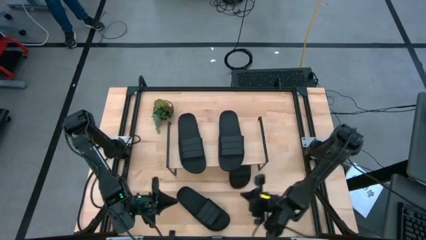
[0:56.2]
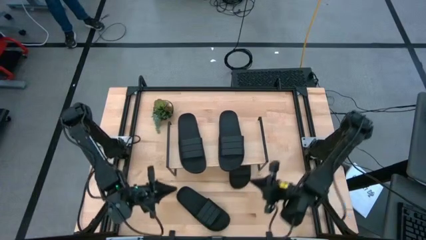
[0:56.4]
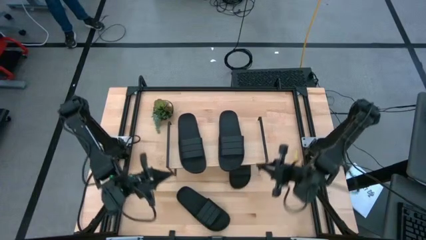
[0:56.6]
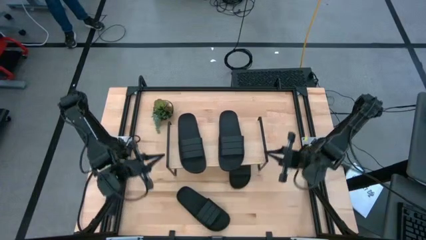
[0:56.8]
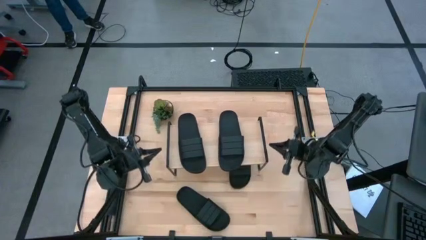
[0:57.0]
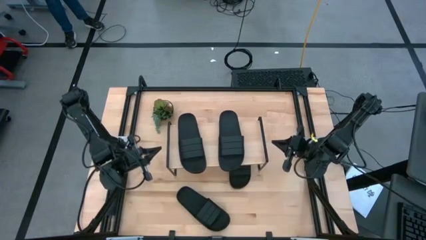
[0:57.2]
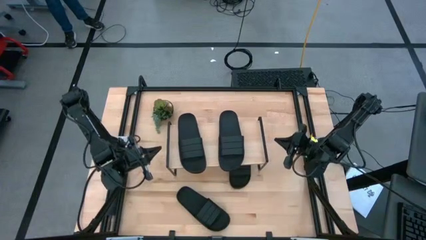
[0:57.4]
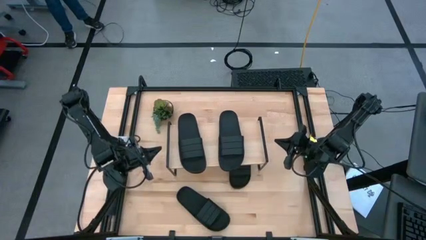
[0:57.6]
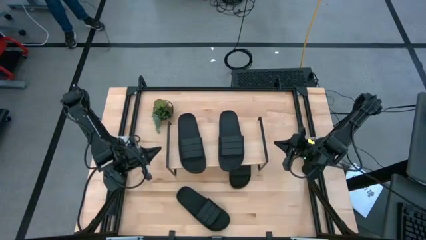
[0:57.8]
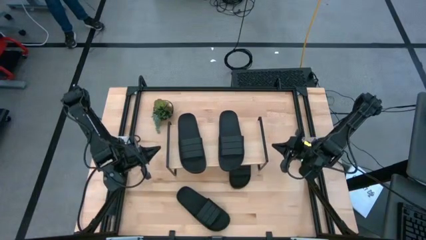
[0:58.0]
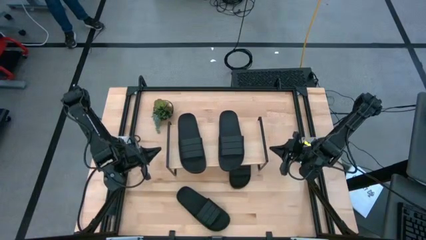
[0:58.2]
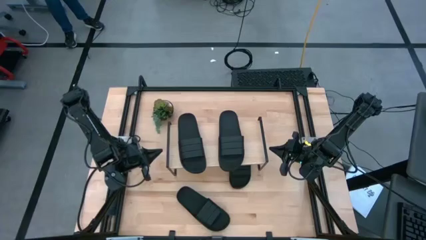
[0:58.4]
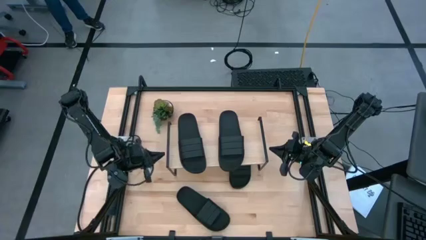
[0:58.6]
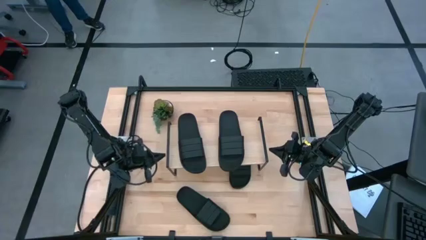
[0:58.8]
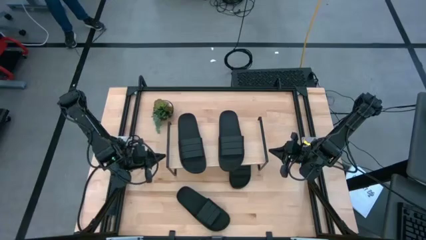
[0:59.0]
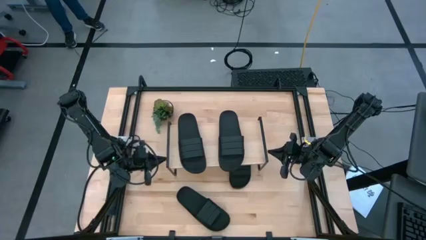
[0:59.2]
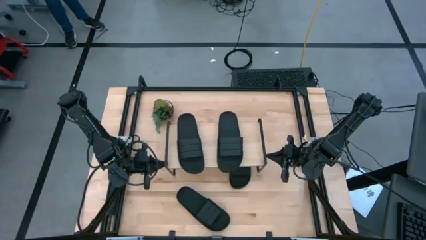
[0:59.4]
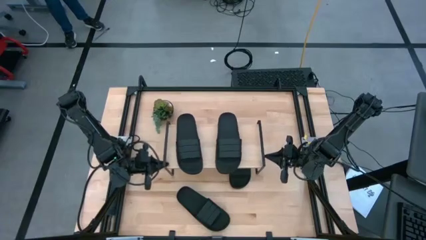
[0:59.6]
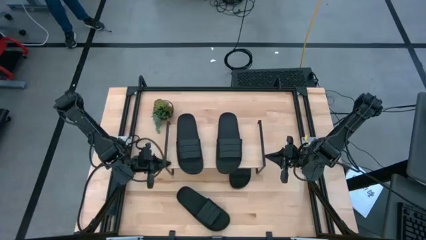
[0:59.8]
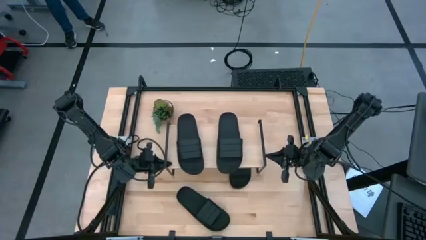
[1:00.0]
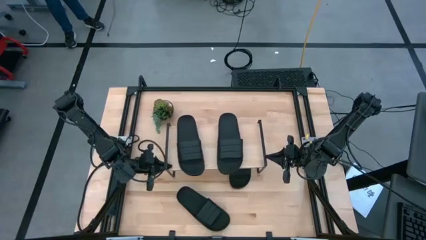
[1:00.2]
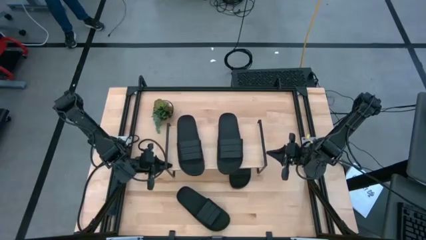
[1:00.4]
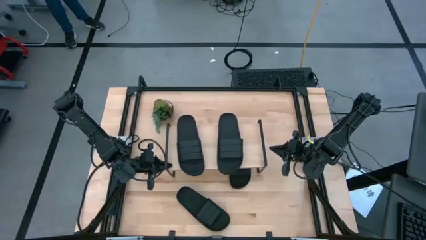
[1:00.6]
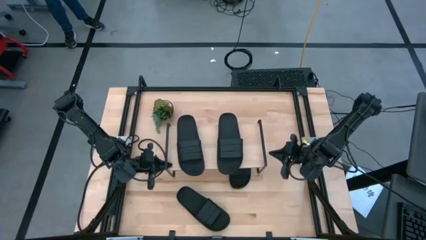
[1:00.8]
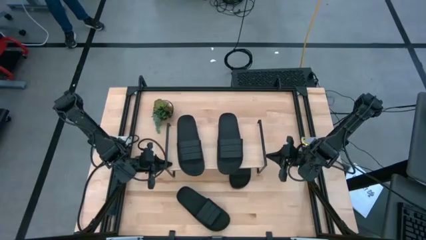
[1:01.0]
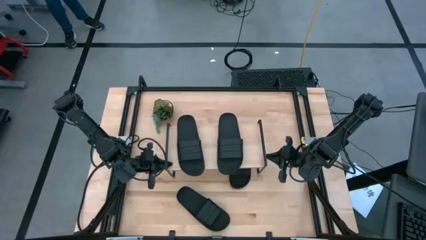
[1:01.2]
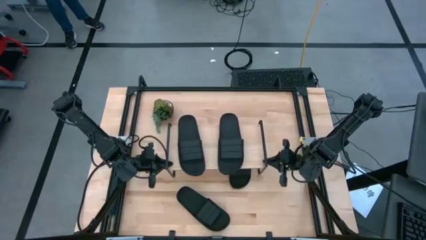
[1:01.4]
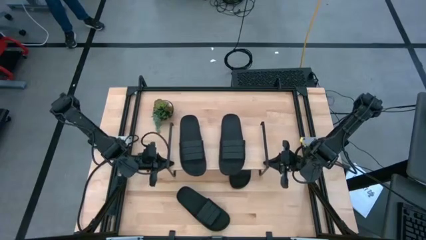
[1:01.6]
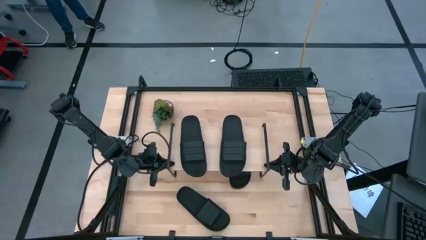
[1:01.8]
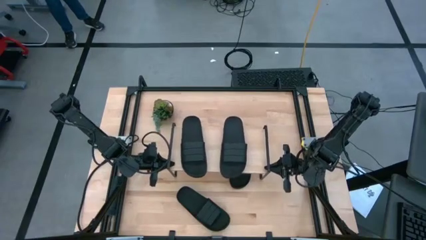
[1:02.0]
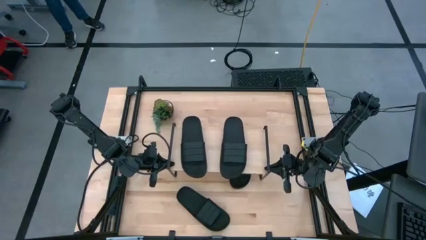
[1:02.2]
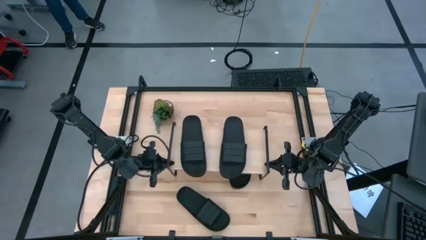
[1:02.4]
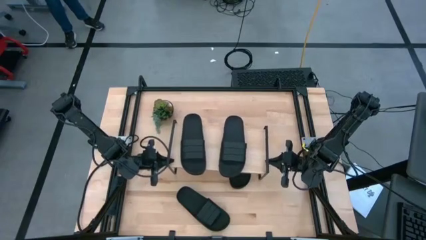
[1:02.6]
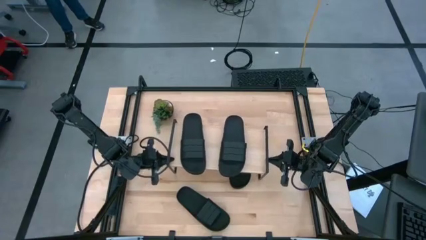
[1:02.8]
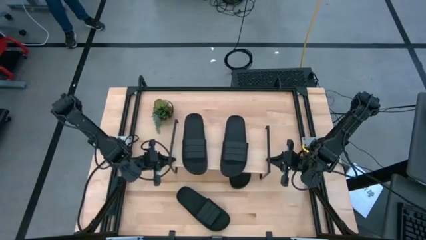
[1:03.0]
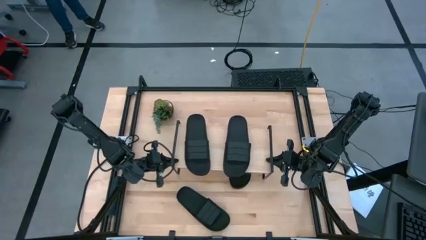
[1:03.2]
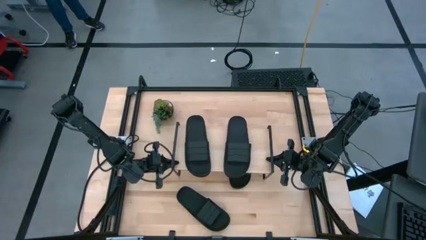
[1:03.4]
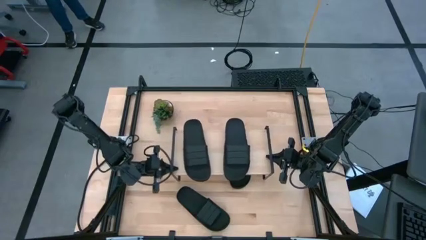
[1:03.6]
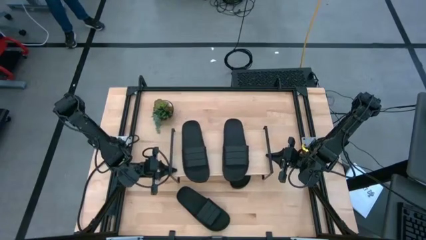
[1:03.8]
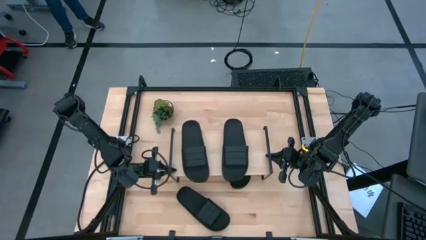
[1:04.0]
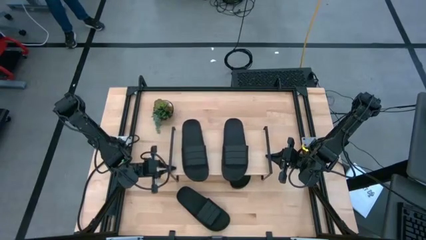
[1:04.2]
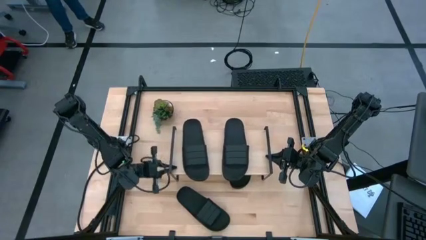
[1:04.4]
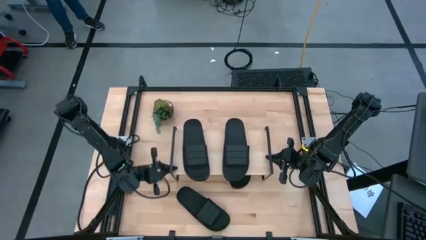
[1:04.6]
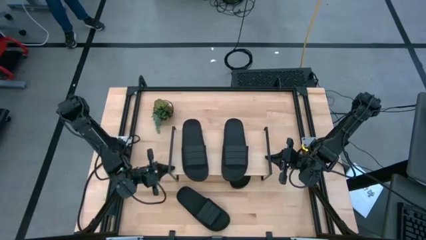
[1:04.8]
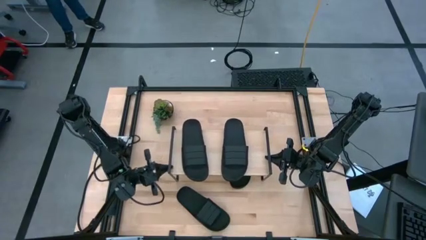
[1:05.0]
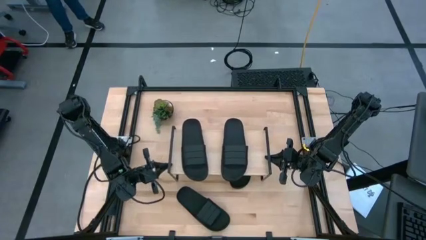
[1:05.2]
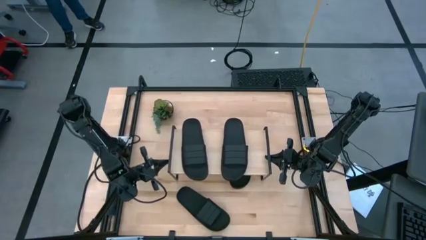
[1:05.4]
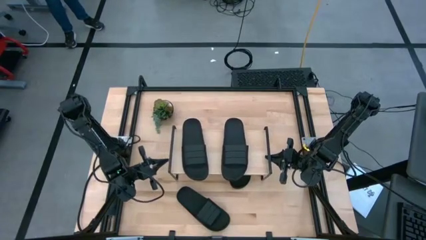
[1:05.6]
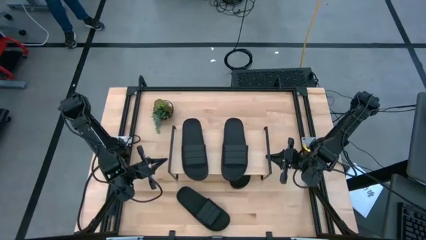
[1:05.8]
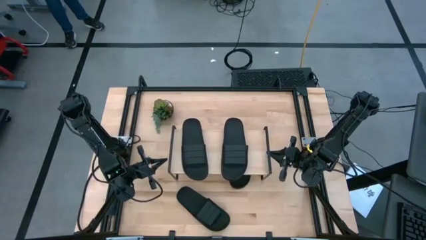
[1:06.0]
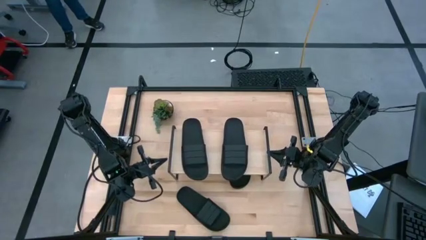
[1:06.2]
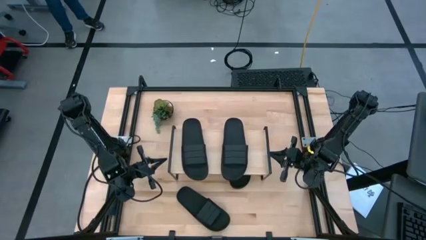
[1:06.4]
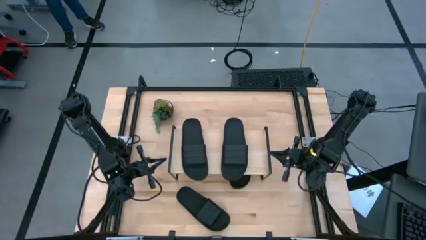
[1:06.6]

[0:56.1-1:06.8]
Task: Pick and place slides into the shelf
Adjust the shelf

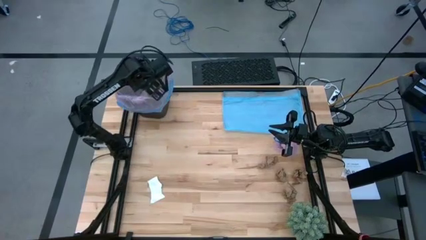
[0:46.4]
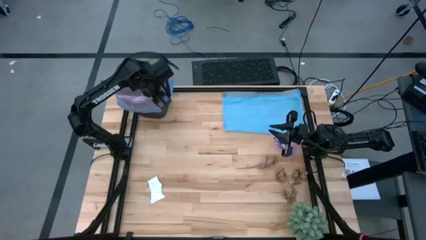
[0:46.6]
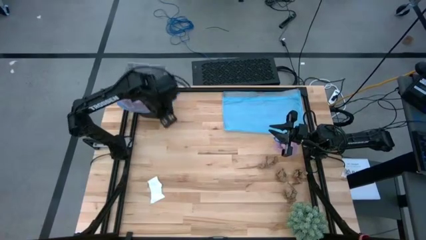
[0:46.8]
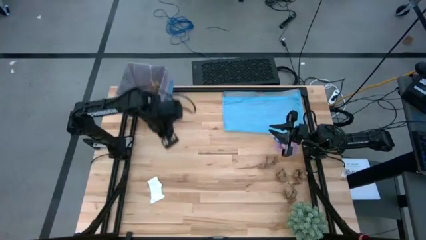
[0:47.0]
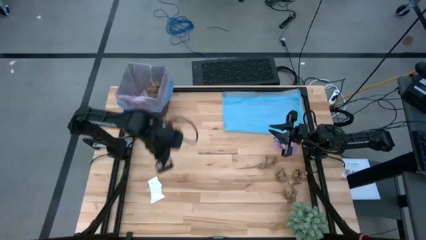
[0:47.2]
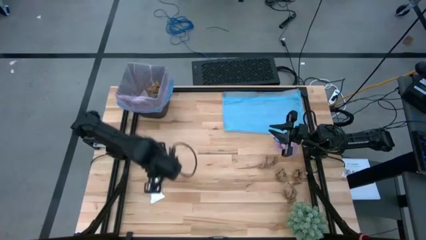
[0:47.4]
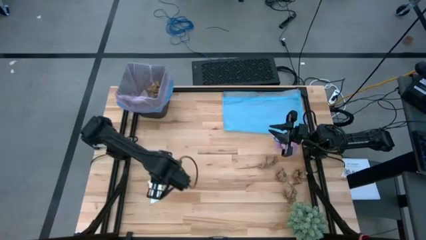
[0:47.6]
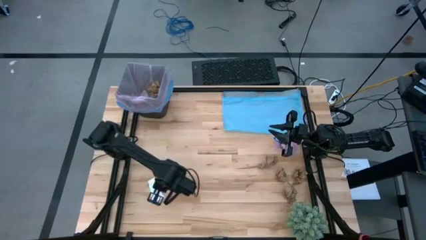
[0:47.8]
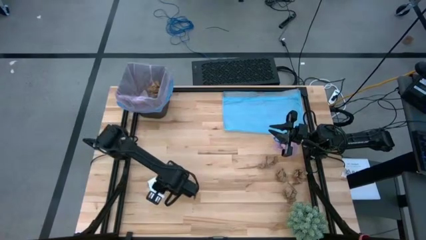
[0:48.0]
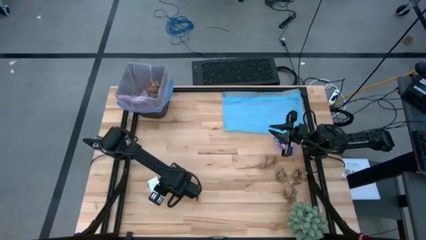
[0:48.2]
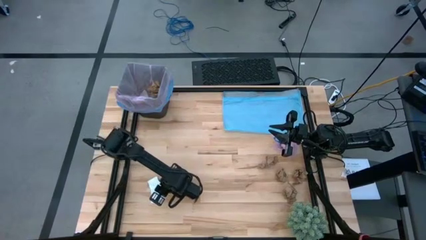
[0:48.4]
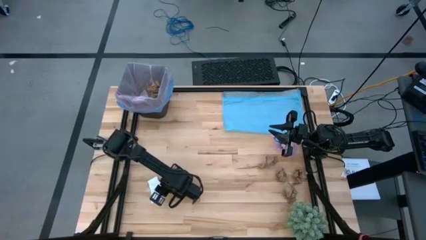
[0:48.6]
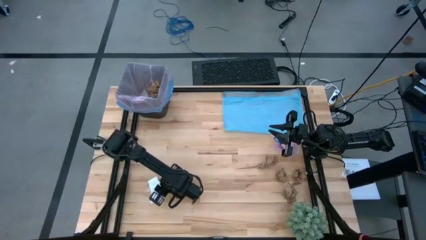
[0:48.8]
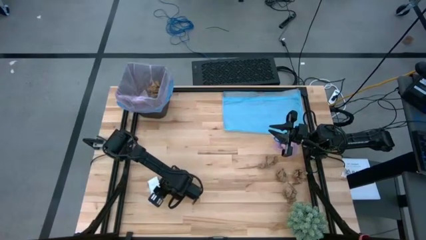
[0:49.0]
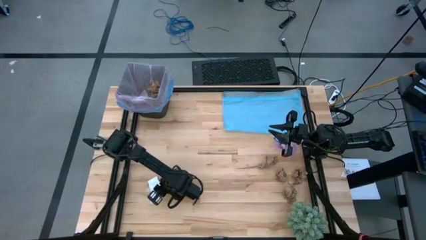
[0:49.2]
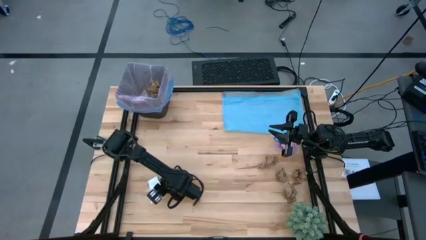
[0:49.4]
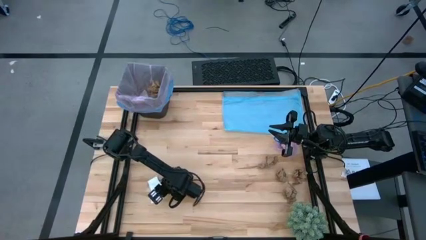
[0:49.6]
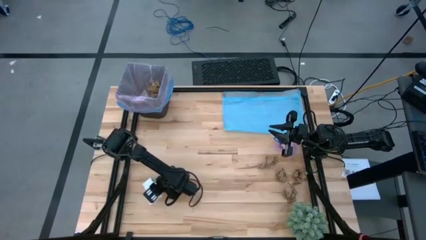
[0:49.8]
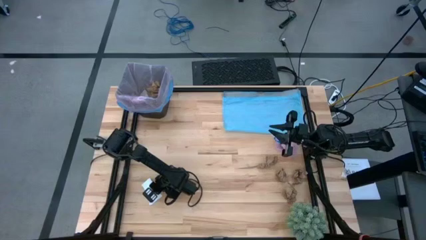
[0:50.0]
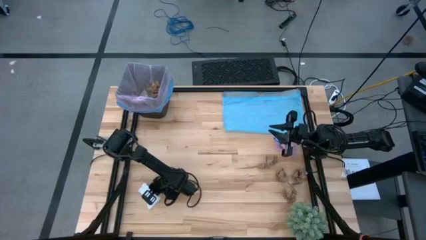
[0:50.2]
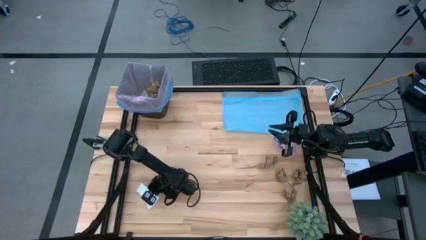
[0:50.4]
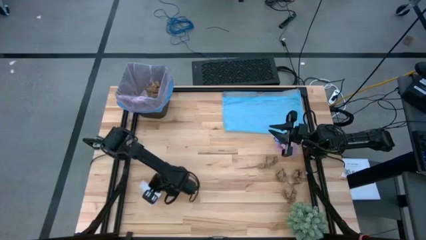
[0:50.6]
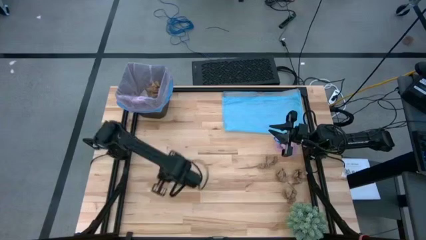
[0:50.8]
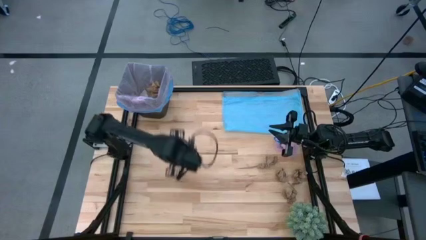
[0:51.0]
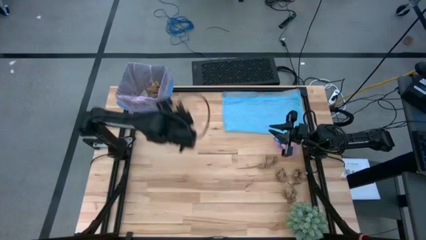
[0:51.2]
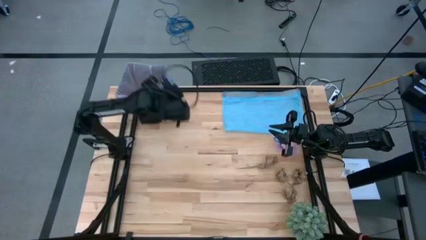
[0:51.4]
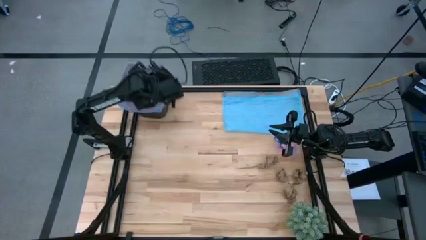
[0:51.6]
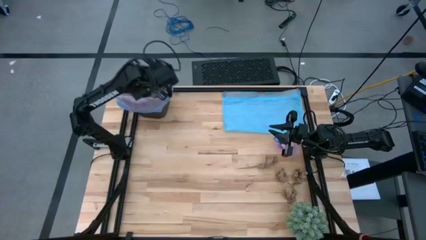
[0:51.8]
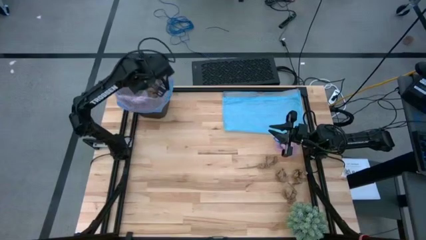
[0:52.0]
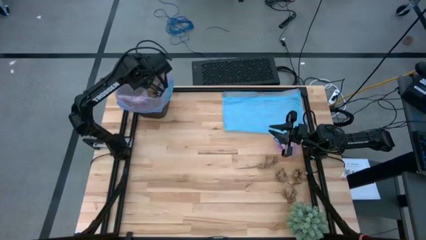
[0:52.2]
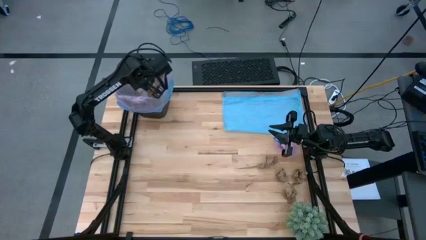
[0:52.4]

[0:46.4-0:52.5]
Task: place trash/remove bag and relplace
Put the white paper into the trash bin
